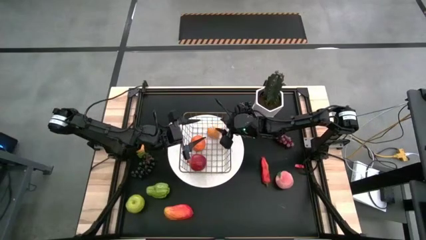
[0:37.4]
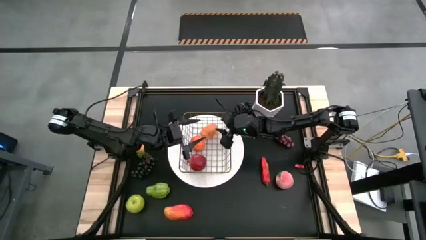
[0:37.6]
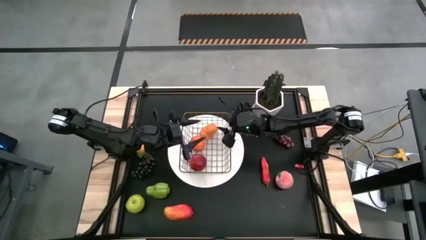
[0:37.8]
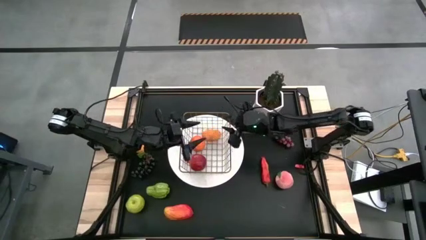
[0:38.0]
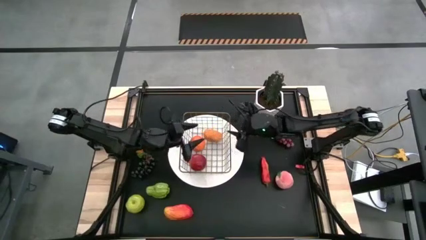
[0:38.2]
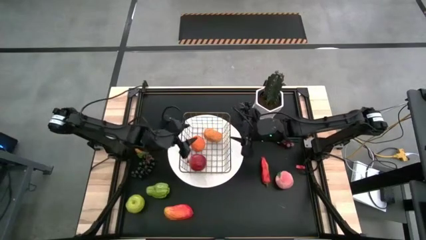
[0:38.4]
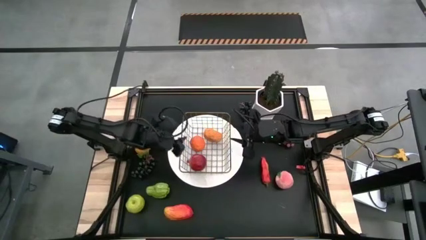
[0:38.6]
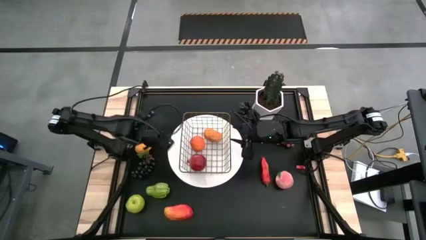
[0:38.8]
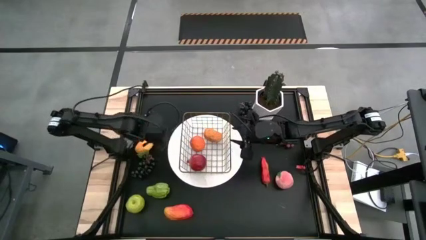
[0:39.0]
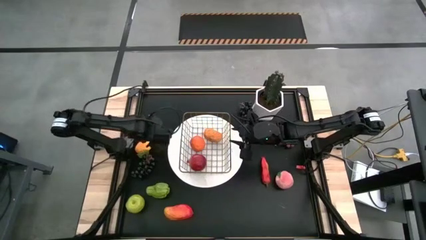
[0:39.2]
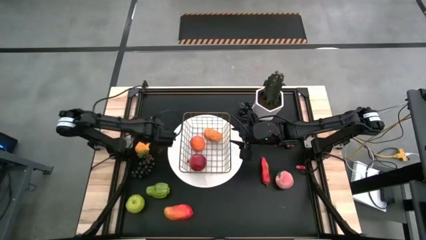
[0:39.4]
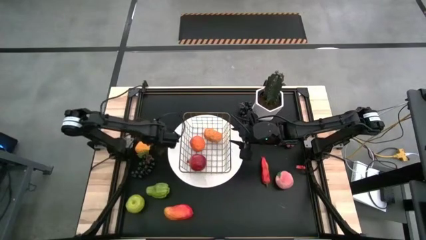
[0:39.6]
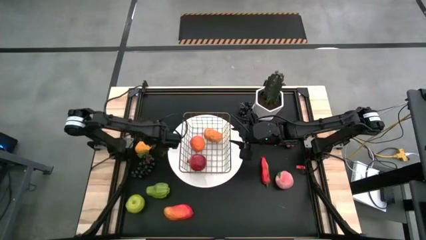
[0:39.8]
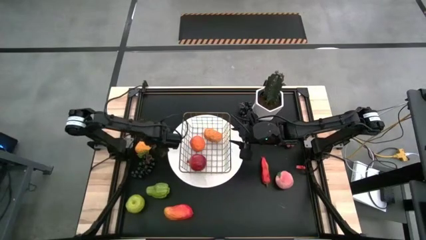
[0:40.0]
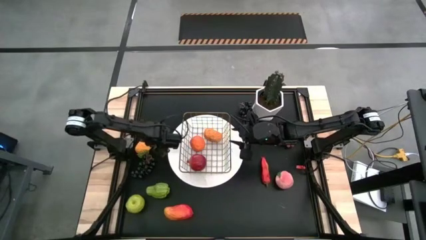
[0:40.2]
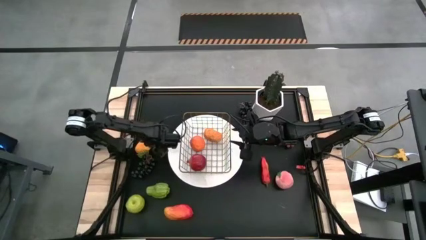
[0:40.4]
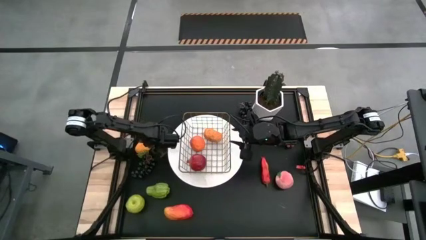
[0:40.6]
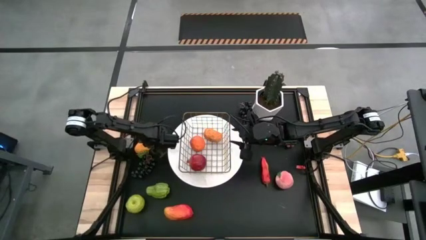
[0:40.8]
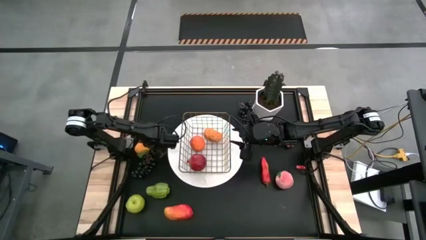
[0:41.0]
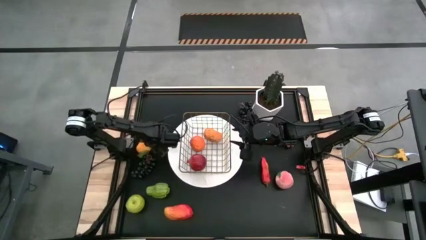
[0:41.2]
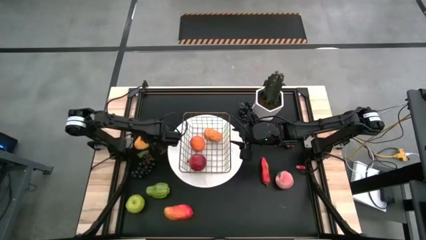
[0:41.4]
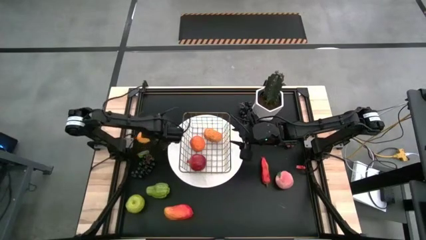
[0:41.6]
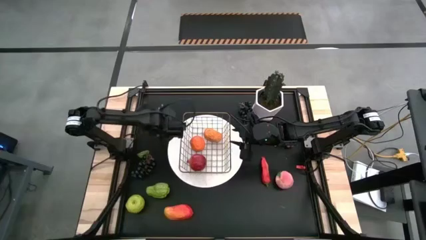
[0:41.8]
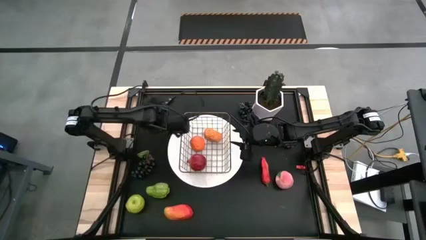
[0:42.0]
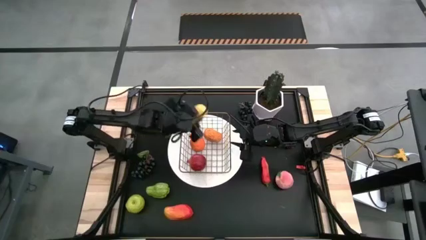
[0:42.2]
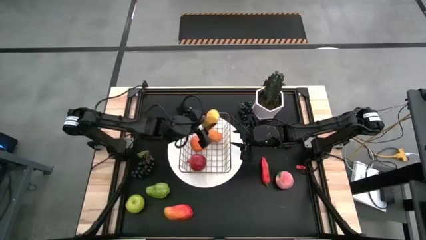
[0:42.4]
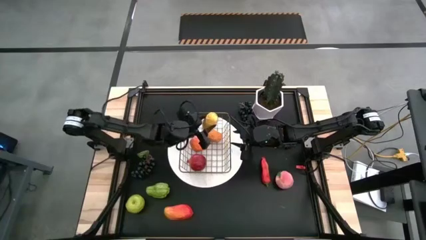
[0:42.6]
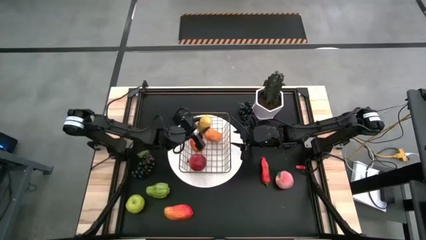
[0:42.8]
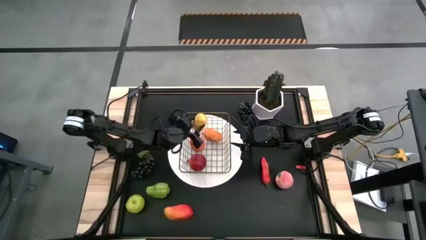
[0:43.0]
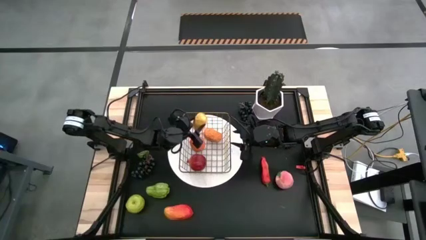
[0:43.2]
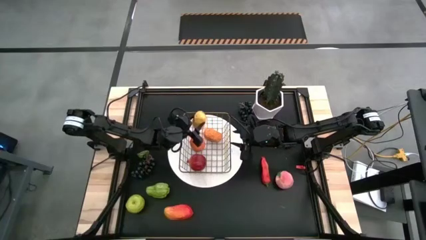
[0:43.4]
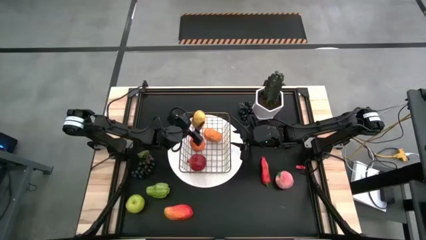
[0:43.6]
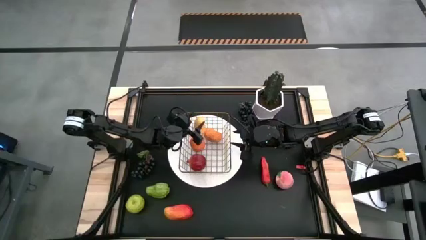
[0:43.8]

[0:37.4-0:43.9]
Task: Build produce basket
Put the yellow mango into the wire basket

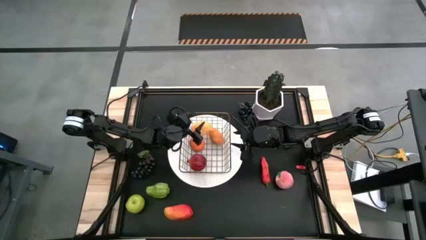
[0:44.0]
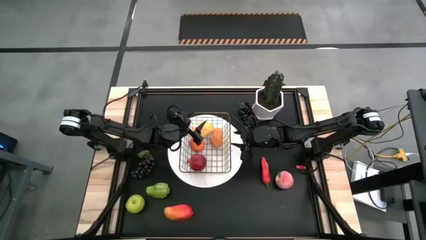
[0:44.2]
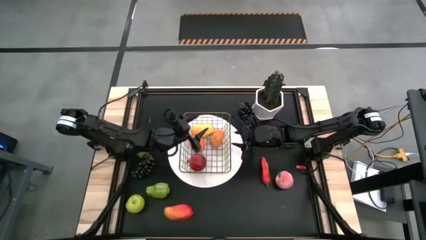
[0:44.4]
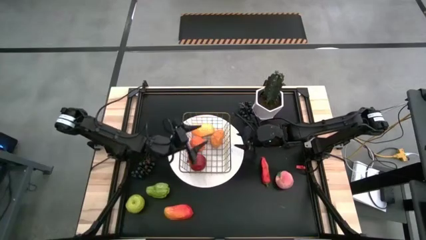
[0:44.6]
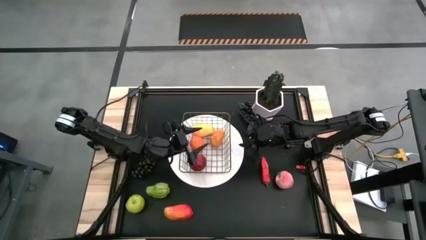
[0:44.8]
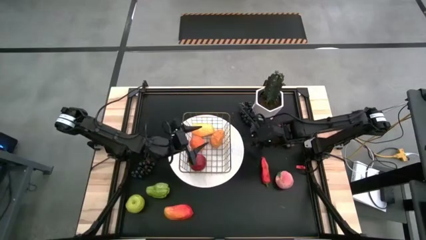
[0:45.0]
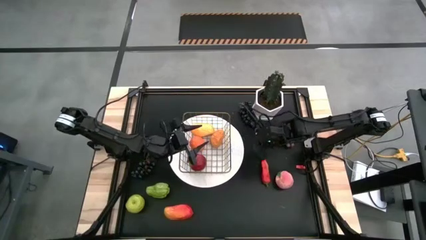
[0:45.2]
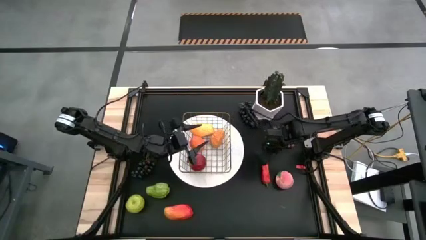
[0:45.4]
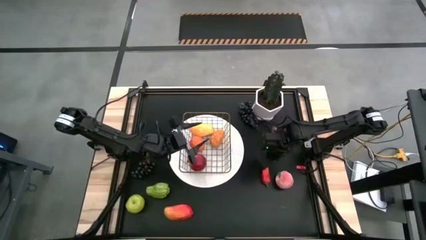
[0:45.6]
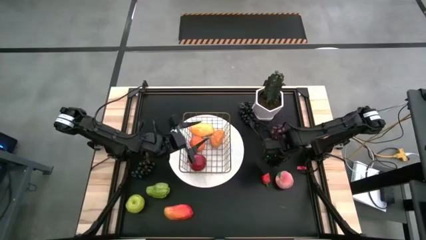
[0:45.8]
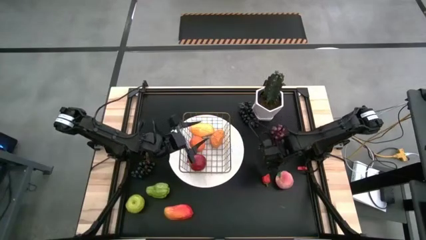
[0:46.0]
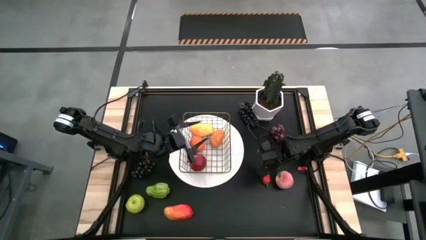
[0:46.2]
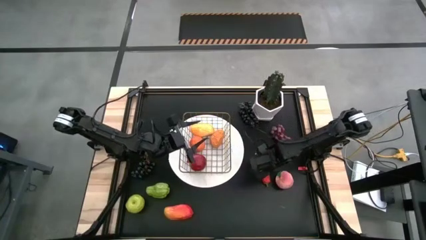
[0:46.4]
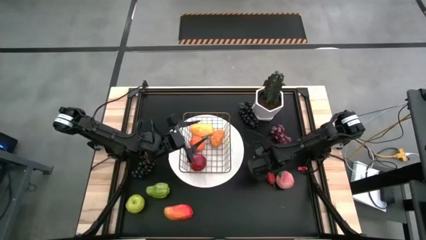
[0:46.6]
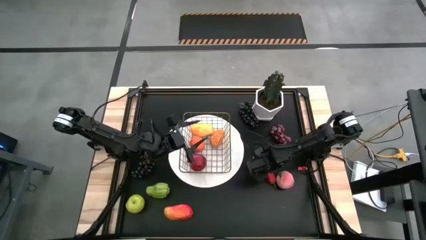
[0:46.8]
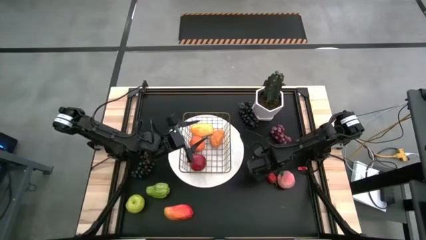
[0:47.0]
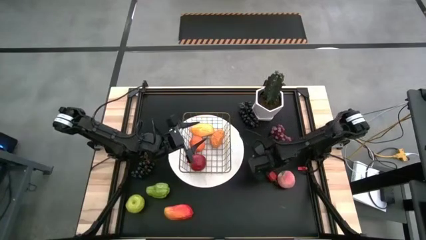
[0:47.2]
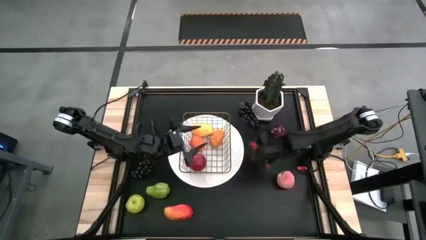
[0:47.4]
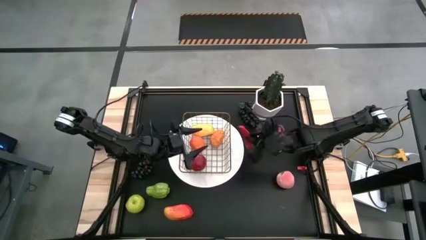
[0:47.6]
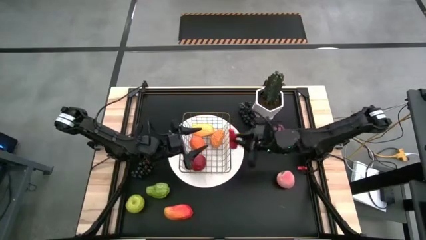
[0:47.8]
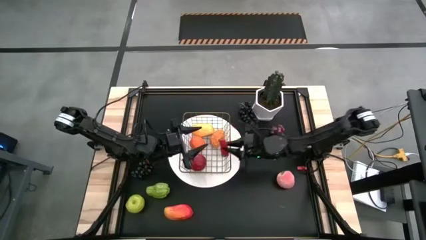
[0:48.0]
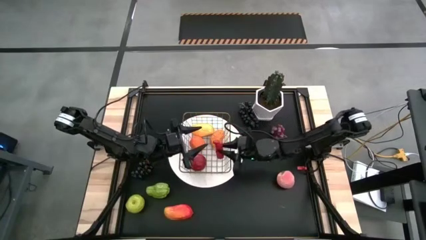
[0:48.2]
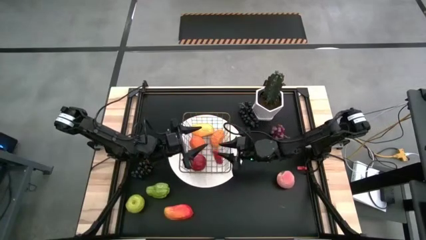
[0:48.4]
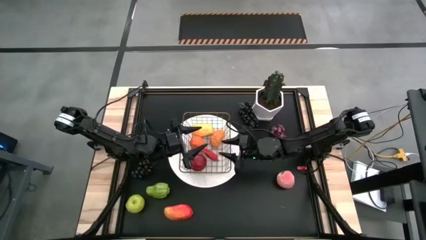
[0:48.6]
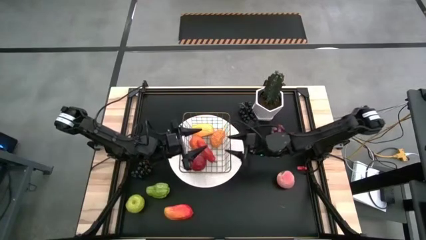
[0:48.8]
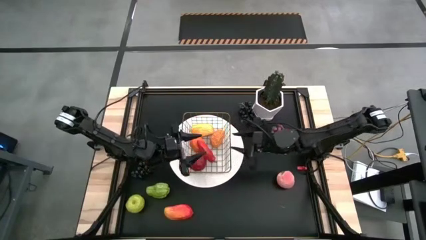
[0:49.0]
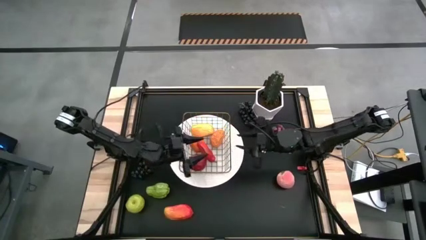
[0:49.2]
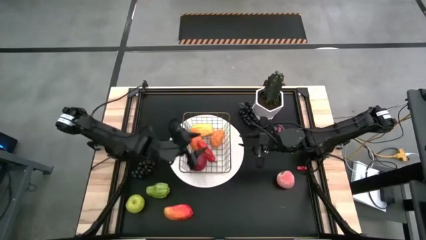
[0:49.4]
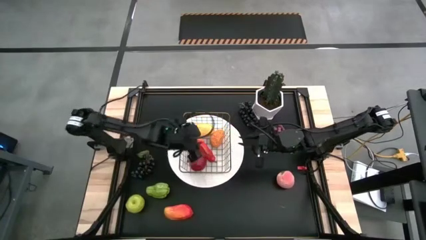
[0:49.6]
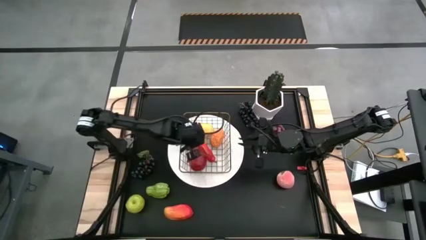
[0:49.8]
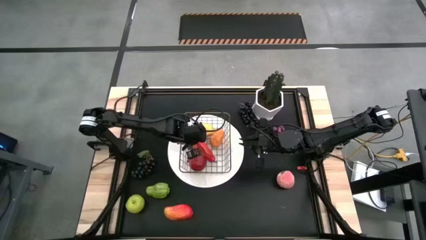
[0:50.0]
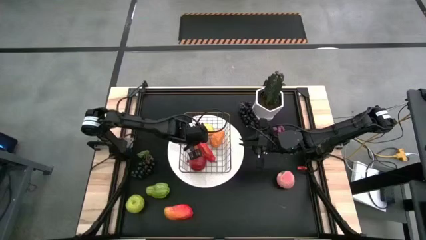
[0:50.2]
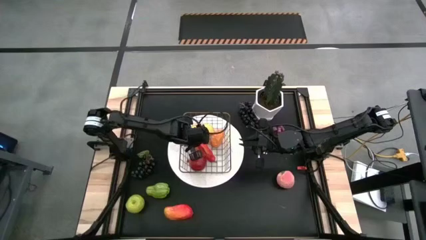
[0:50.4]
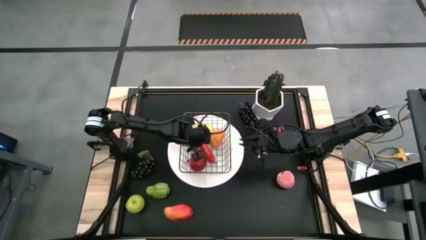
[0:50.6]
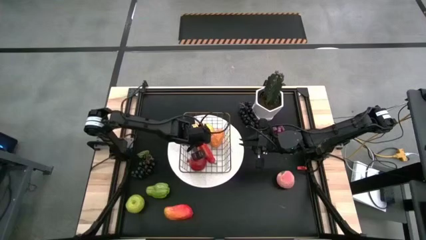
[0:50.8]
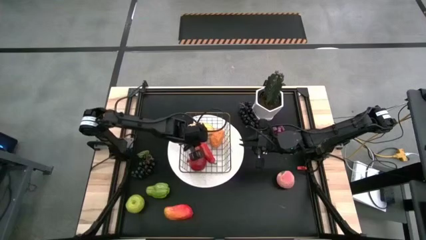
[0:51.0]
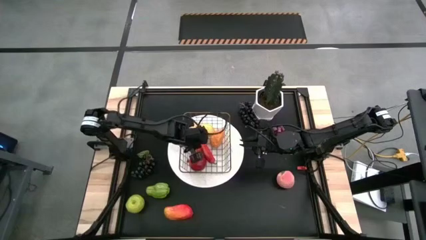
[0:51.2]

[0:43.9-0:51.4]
Put the red chili pepper into the wire basket

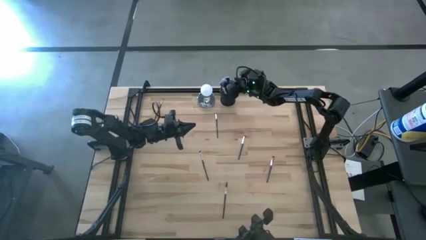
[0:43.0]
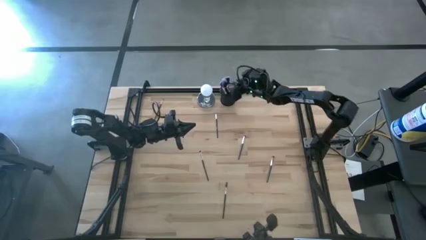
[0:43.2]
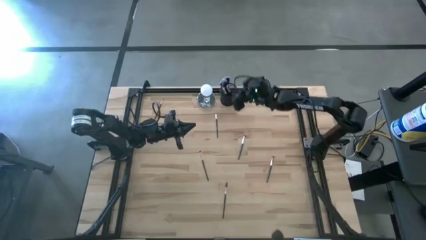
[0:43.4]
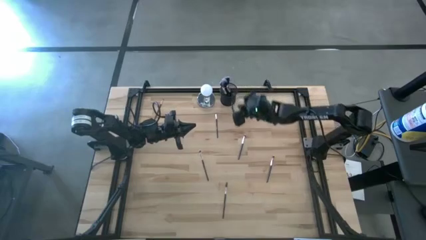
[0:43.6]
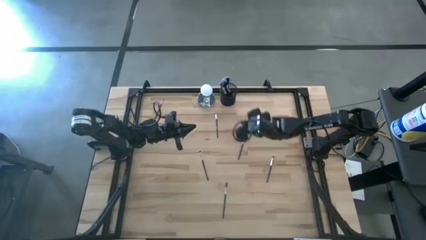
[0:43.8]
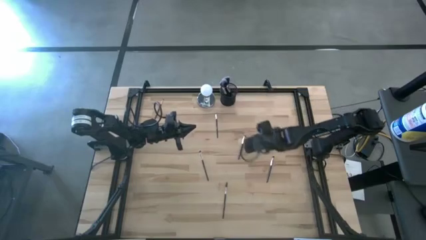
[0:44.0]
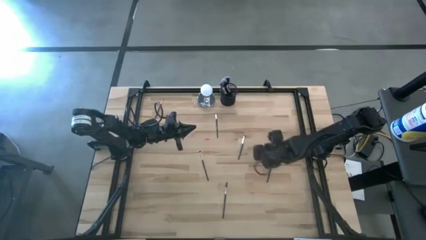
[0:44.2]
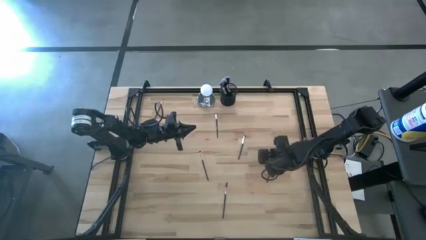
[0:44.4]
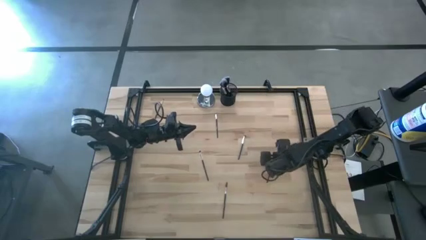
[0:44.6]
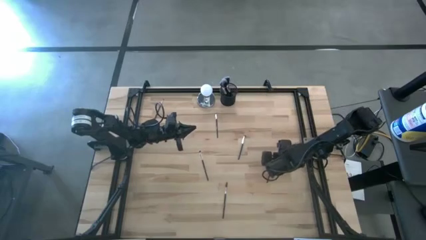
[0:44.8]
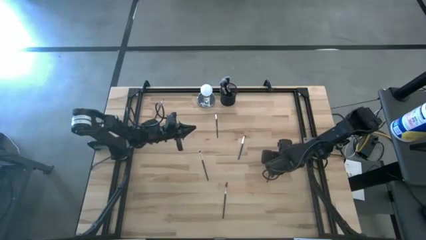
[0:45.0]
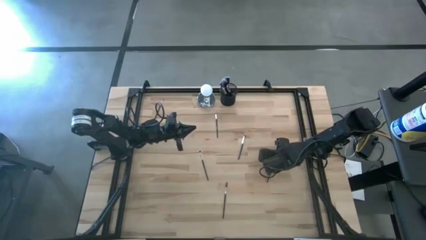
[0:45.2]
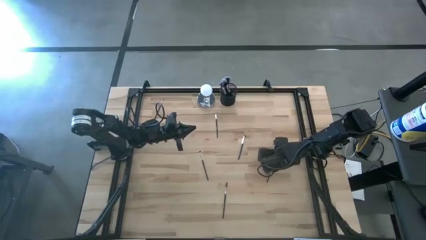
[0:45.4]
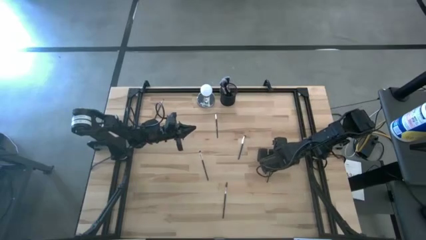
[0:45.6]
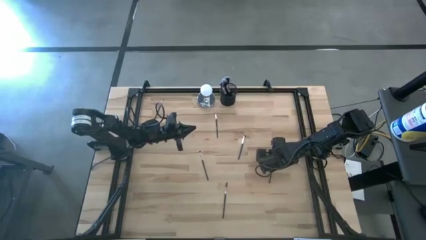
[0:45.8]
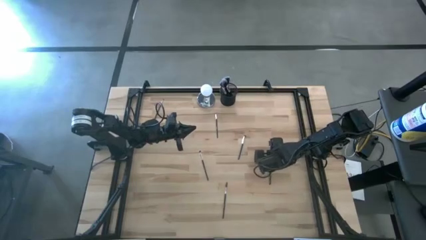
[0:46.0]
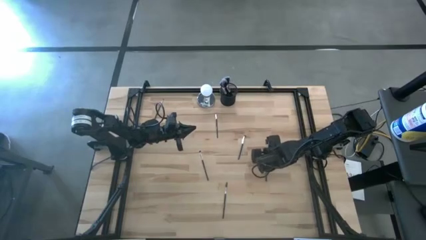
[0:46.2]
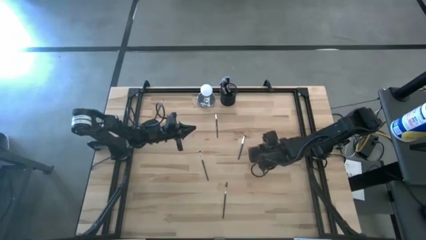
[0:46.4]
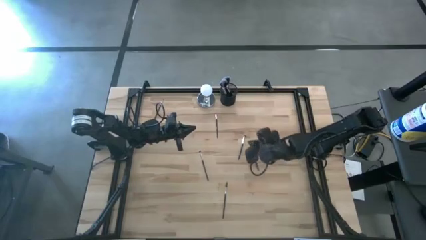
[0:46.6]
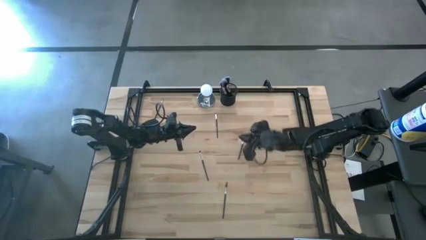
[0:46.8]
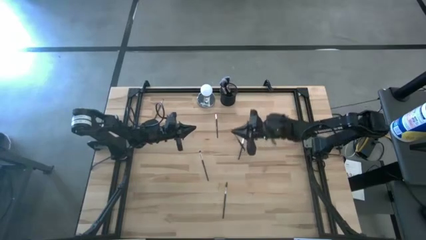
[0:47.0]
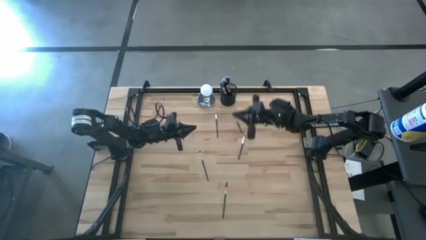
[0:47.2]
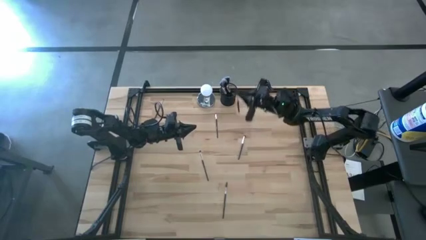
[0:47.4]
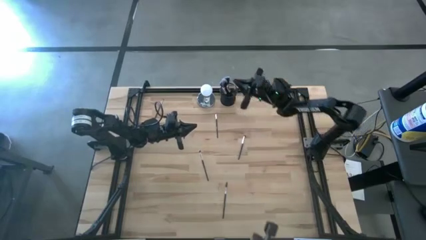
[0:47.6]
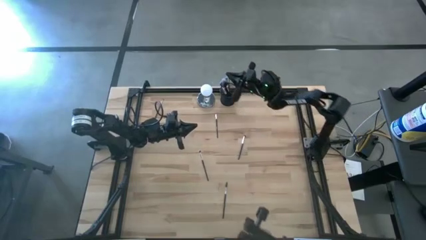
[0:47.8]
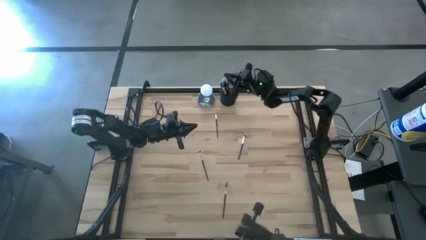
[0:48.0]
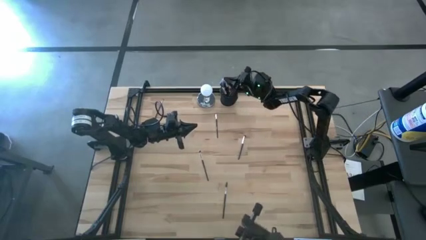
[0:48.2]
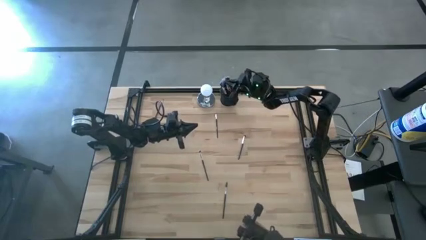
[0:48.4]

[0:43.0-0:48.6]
Task: Pick & Place Makeup Supplies
Put the makeup brush into the black makeup holder
